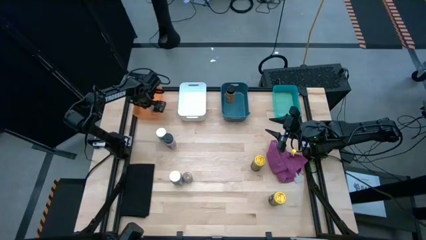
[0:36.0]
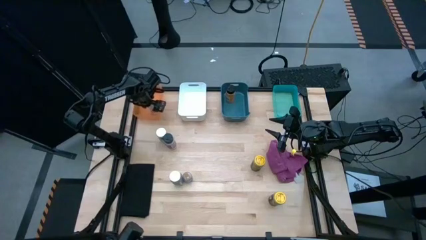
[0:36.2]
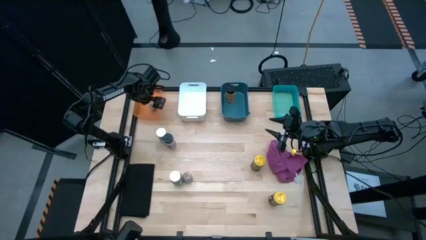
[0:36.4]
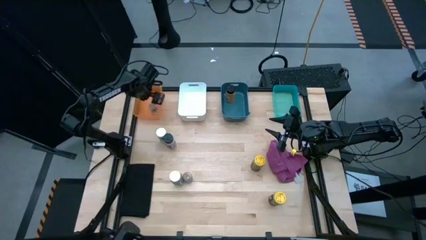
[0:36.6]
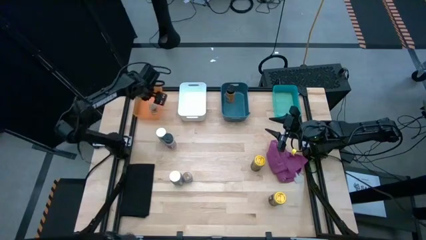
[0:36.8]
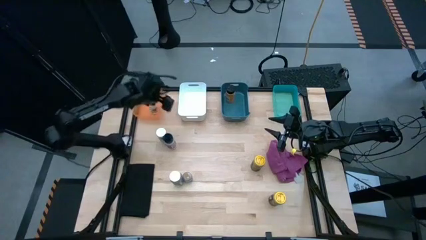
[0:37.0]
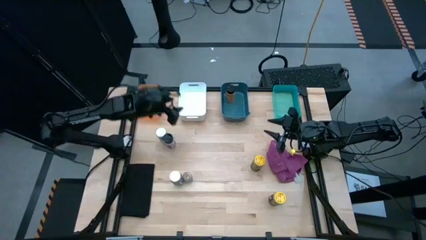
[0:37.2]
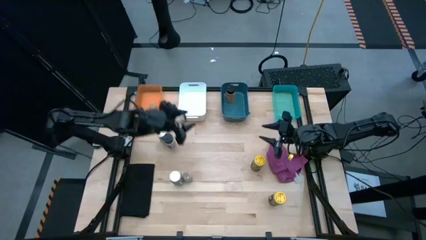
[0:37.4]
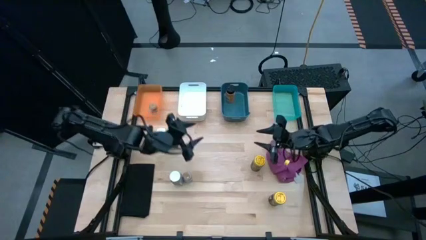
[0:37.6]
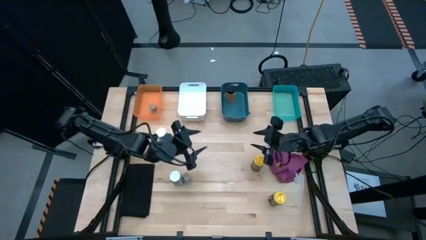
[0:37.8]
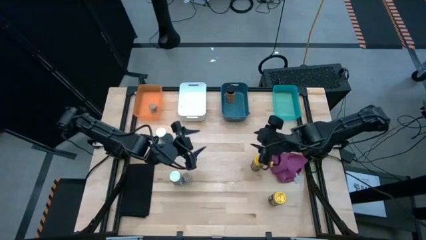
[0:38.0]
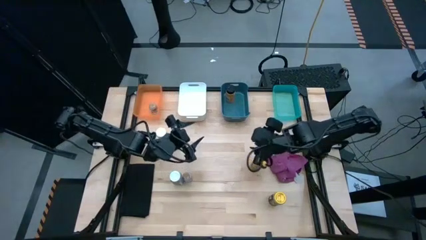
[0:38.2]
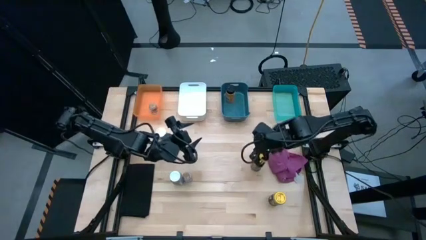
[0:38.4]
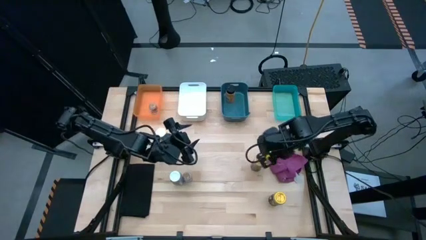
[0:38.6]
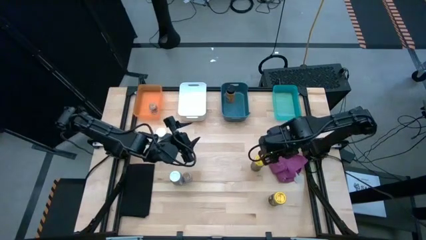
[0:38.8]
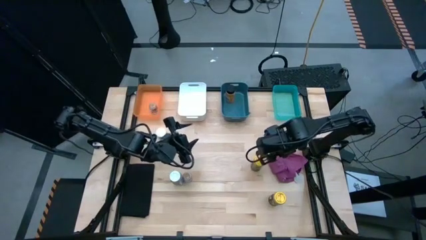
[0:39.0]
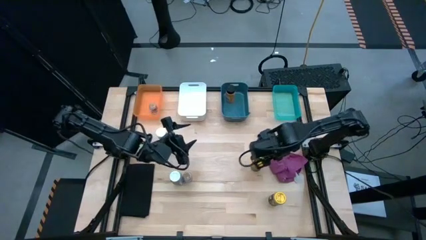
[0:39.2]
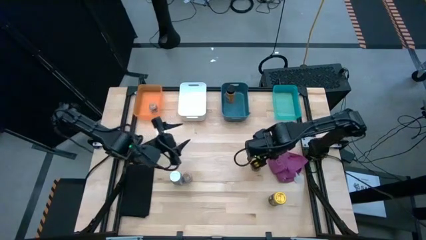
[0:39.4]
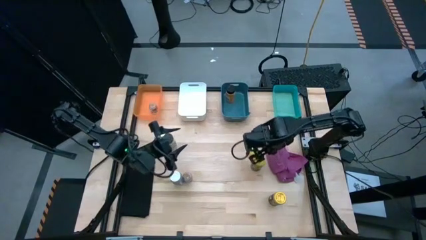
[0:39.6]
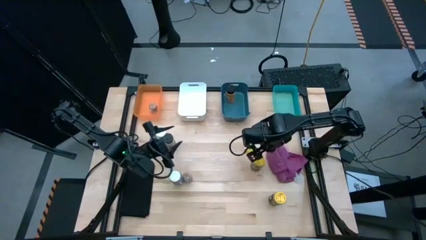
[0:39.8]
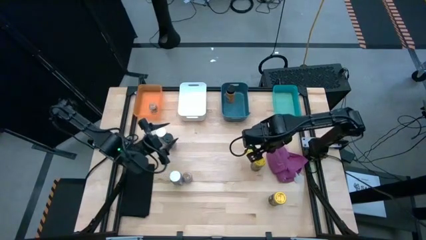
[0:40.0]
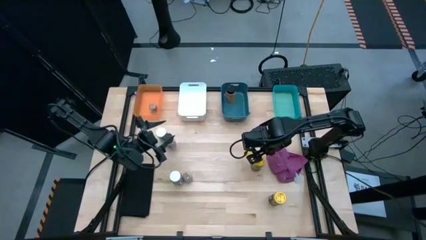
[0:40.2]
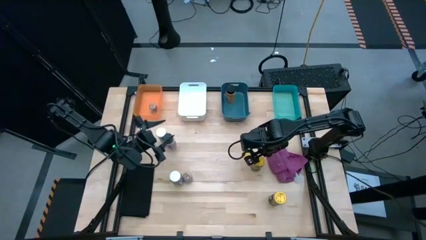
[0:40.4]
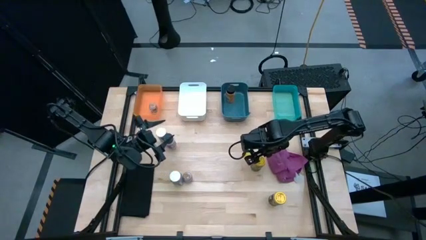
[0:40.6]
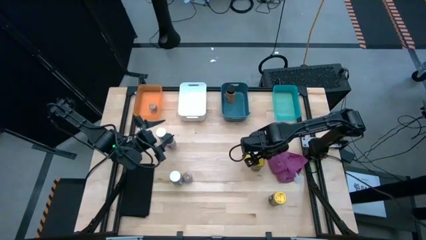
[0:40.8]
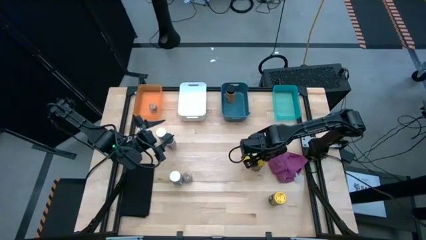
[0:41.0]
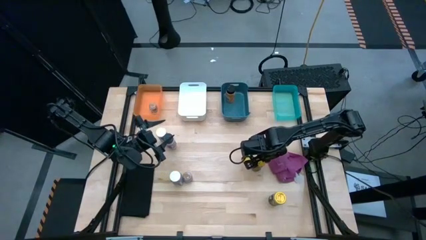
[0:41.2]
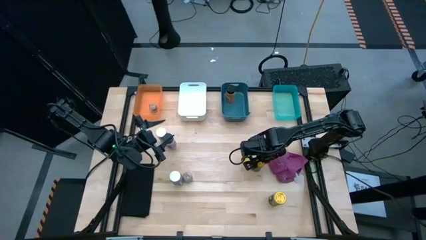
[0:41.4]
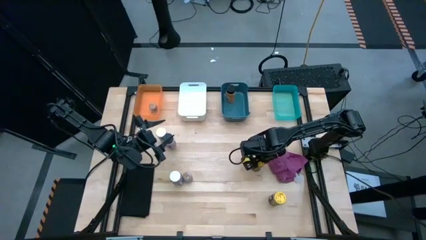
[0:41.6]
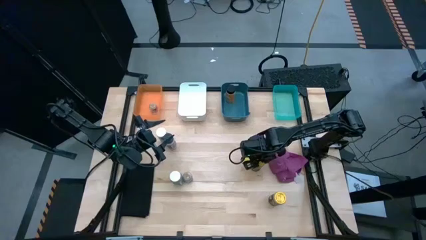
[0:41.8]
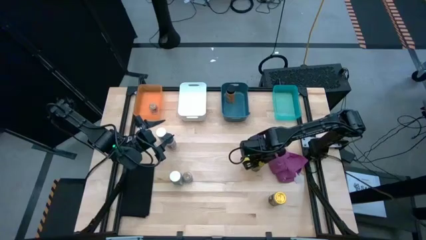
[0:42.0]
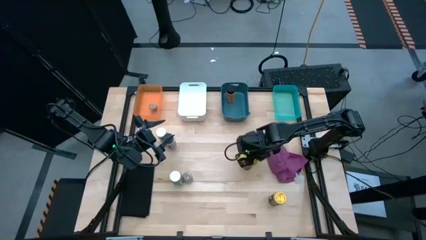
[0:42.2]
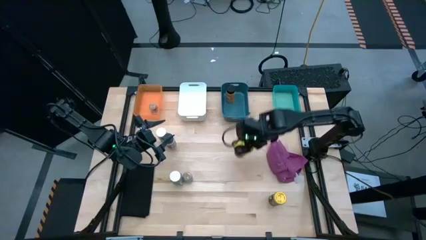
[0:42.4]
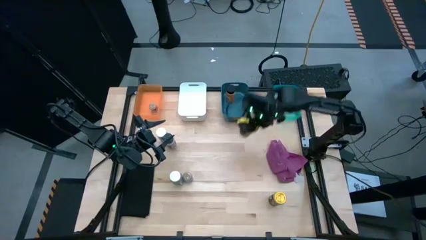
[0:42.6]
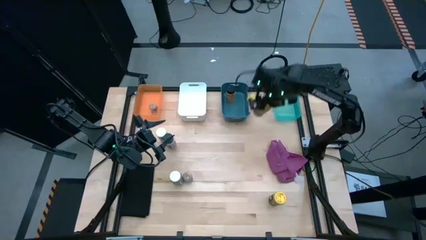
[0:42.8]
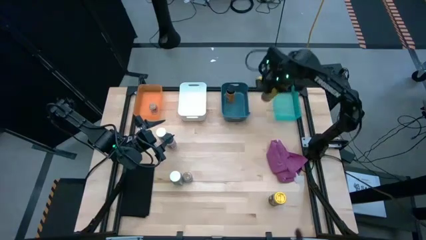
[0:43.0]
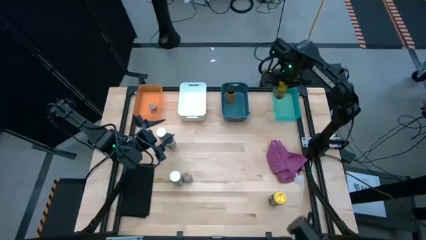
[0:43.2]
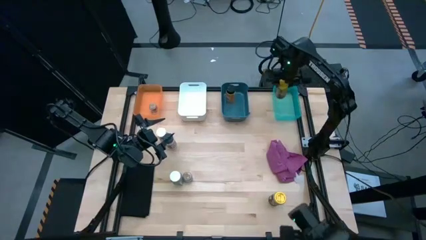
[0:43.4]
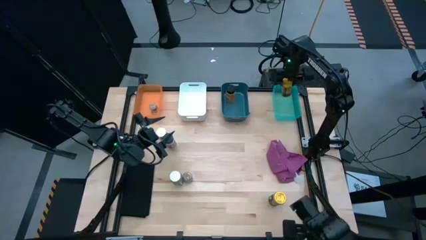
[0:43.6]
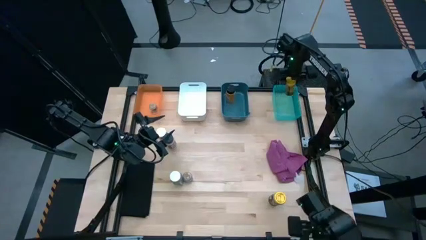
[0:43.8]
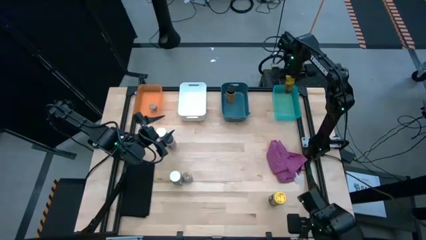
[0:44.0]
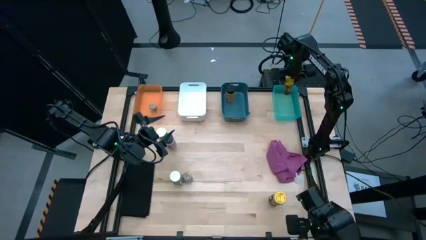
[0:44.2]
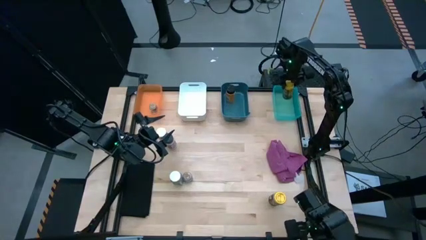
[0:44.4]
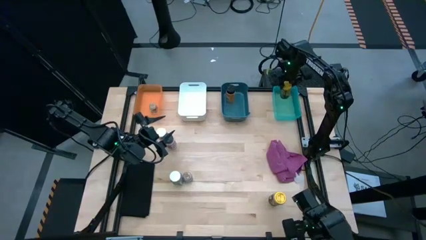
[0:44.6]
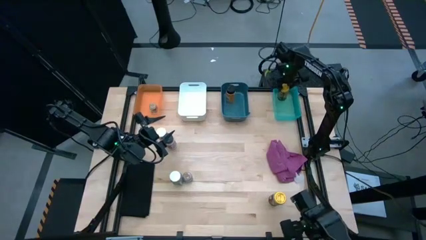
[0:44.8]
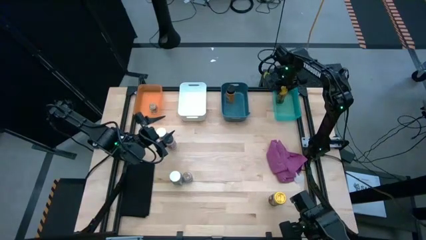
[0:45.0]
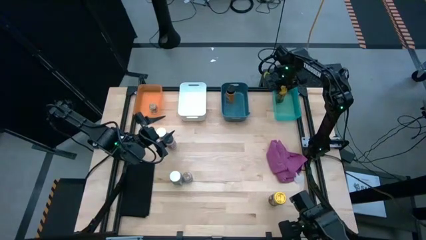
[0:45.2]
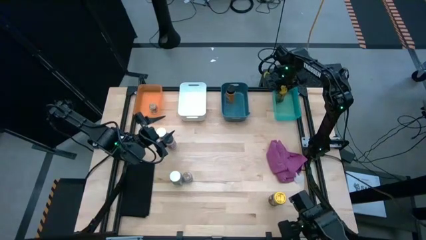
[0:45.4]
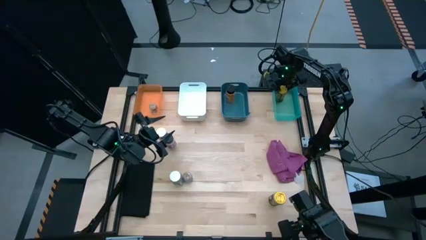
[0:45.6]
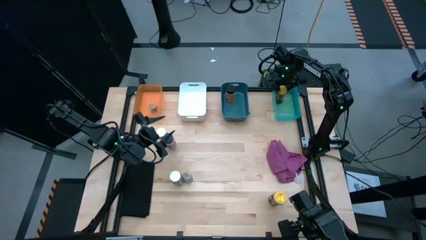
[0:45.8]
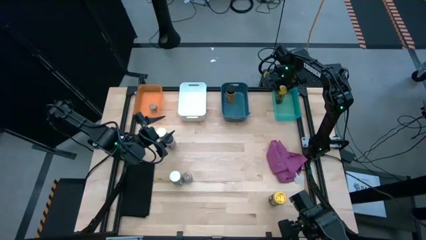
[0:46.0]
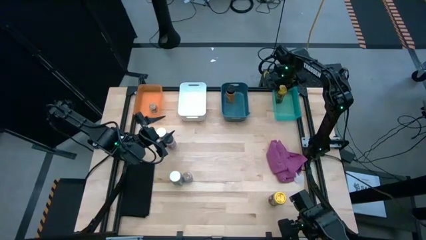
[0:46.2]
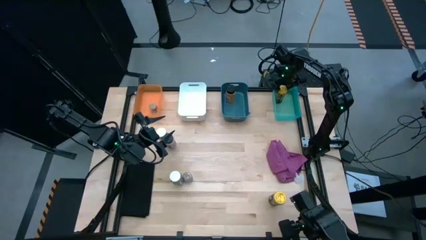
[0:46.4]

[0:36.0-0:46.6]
Task: Sort spices by type
Put the top yellow seasoning bottle into the blue bin

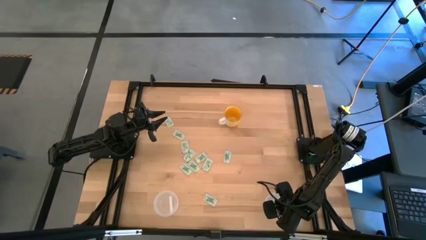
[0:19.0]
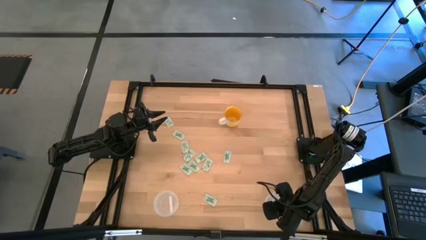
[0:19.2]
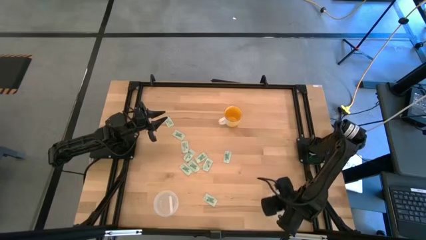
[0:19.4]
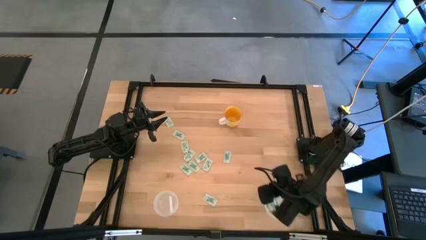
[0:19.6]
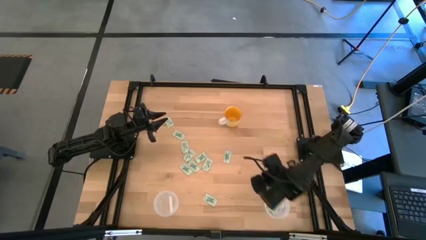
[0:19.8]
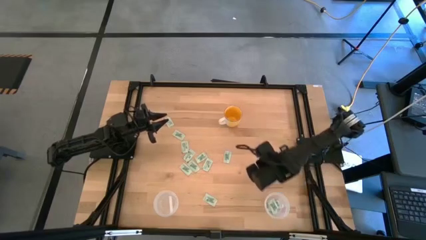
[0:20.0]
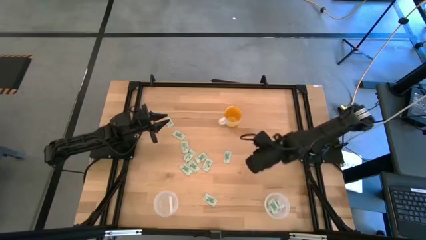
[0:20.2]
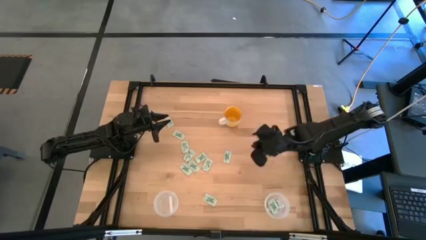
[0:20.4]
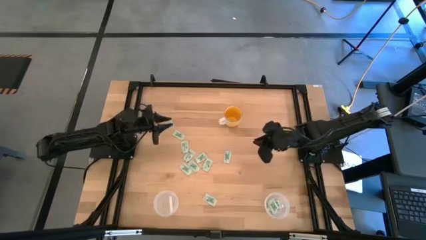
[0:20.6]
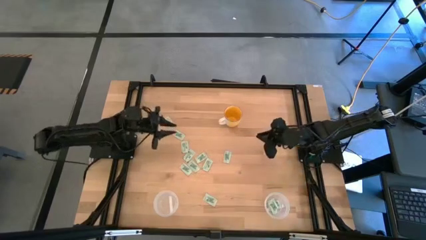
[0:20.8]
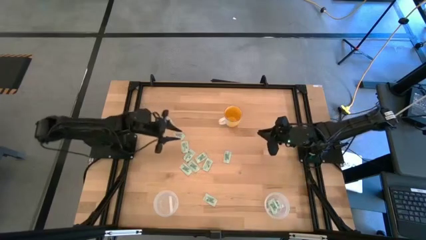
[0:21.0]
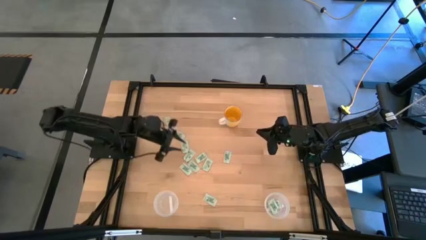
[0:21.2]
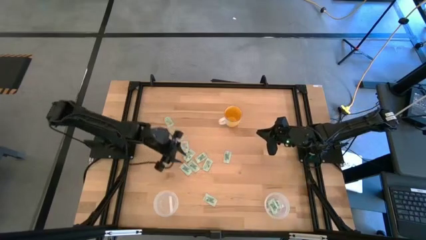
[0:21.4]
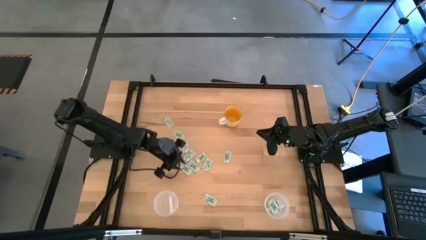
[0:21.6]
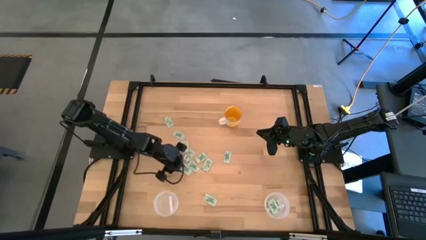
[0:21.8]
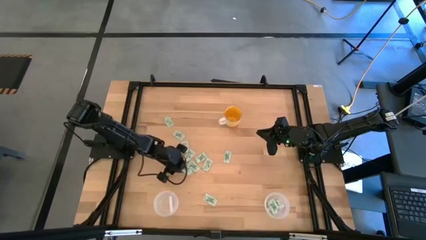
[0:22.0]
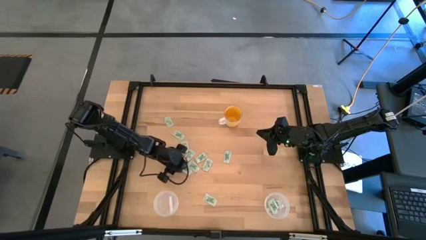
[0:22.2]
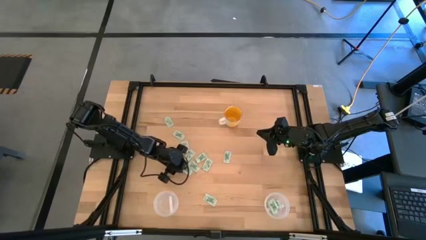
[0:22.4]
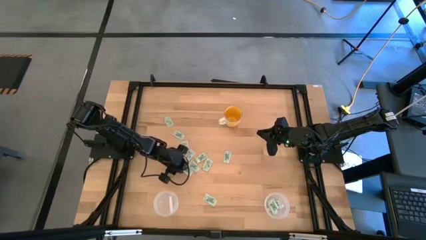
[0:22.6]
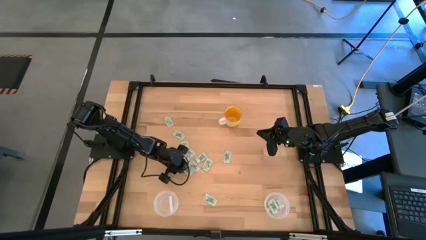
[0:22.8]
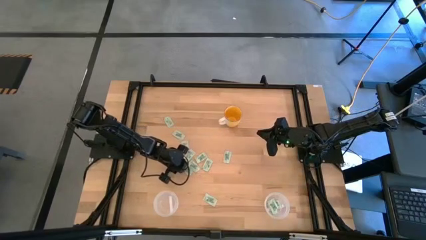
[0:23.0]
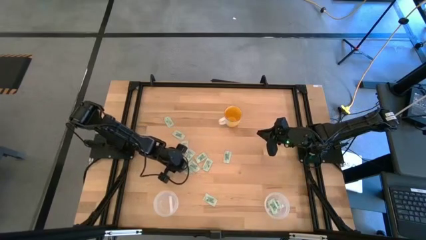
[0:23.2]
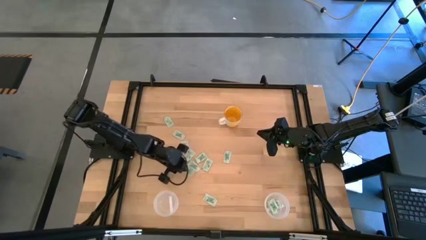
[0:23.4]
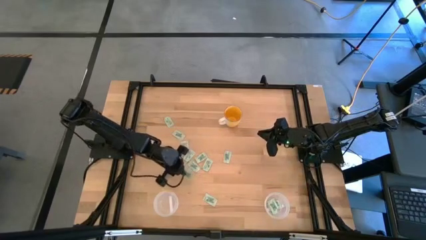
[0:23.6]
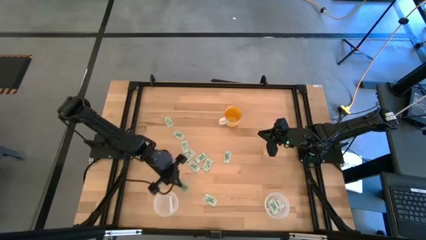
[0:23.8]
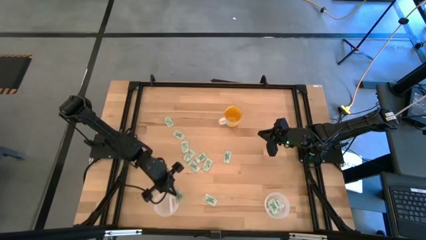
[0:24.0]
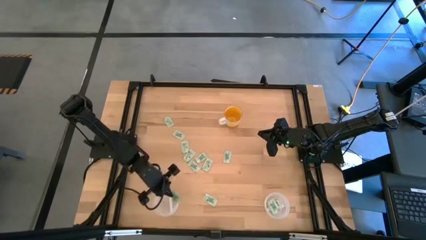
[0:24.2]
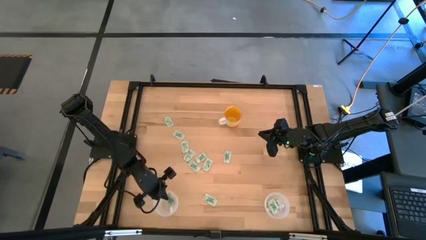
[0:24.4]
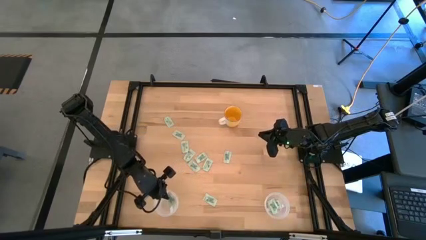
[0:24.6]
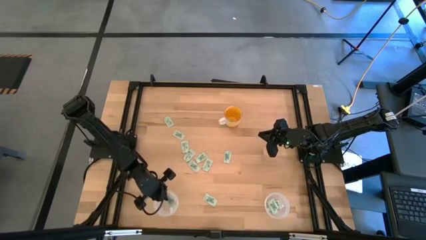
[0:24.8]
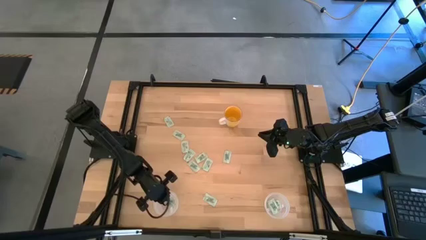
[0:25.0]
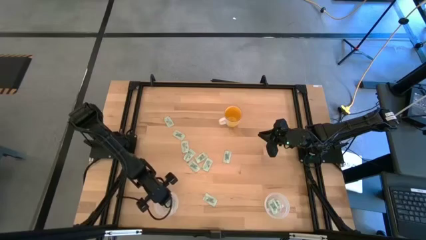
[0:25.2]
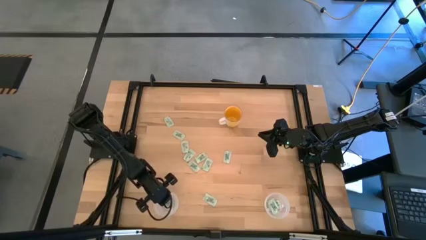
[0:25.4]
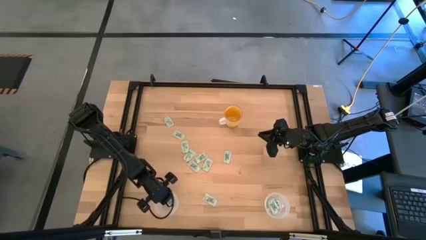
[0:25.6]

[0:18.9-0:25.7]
Task: Pick and place items into bin
Put the stevia packet into the left transparent bin
